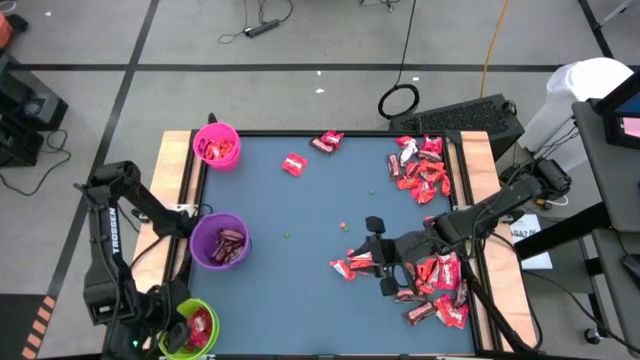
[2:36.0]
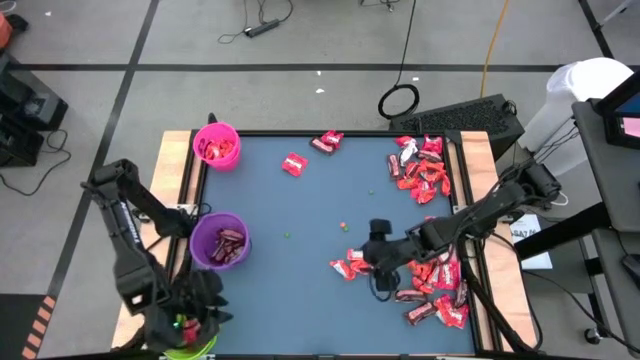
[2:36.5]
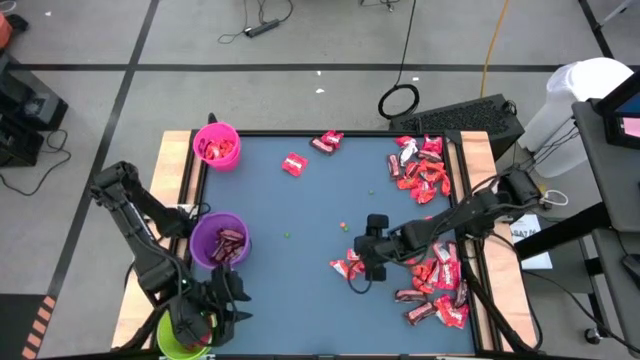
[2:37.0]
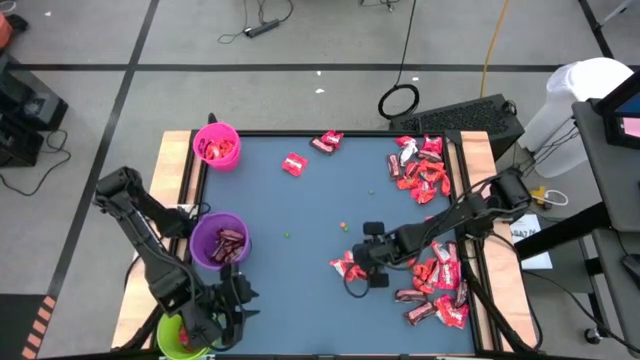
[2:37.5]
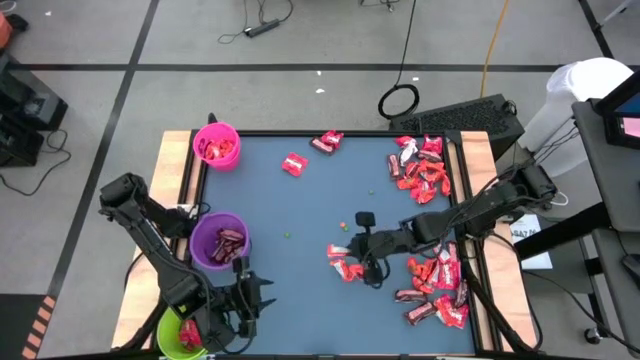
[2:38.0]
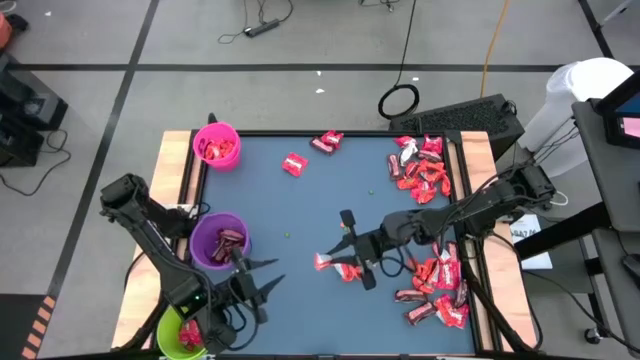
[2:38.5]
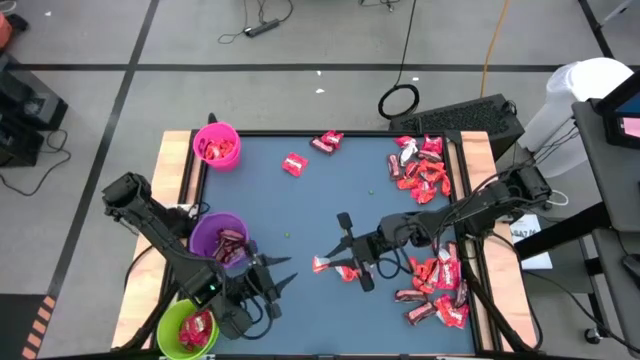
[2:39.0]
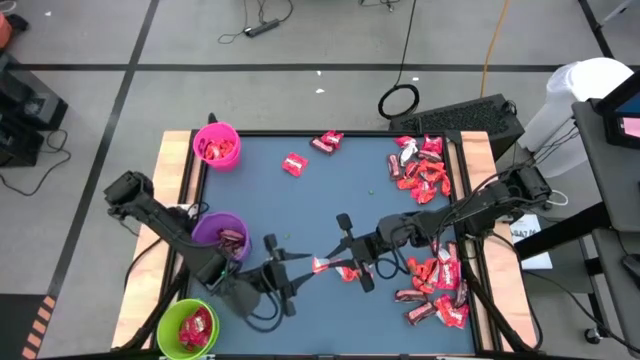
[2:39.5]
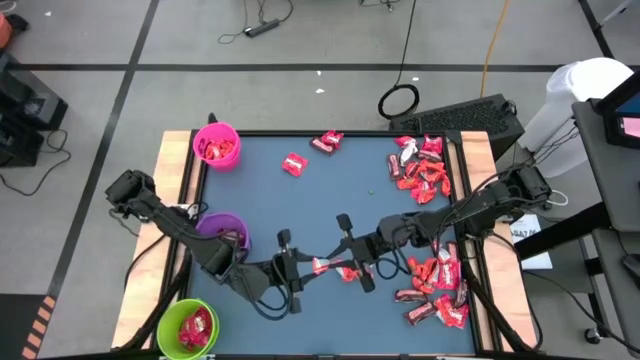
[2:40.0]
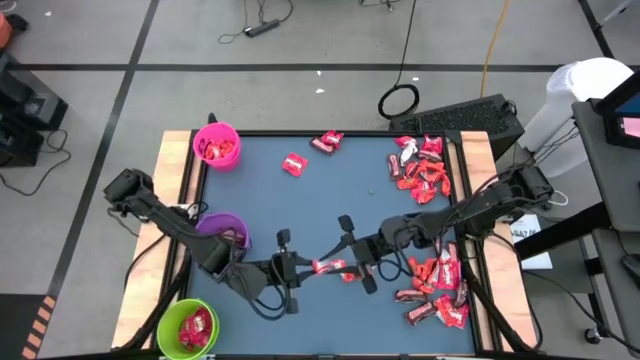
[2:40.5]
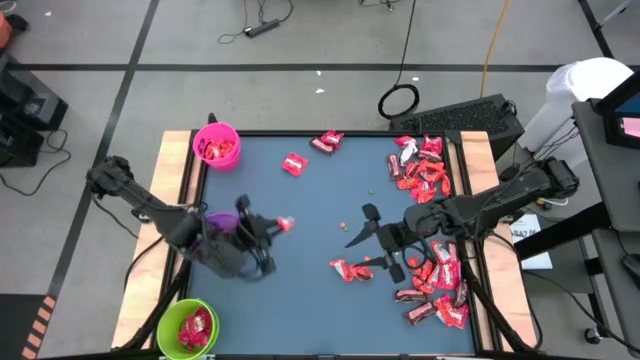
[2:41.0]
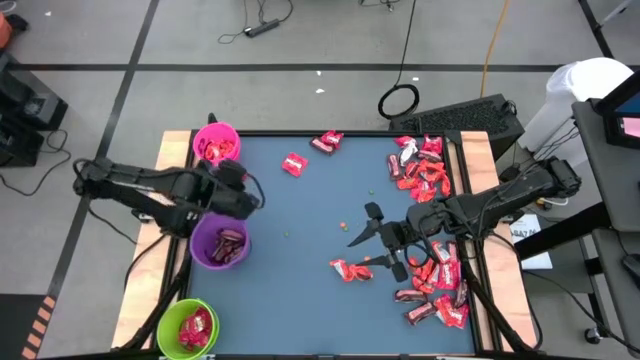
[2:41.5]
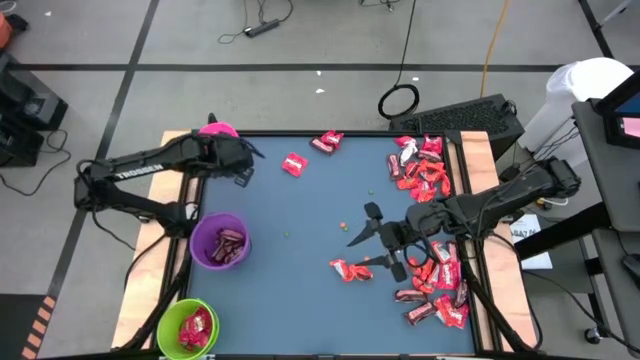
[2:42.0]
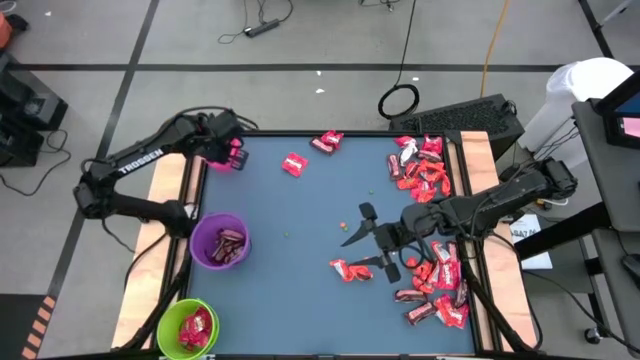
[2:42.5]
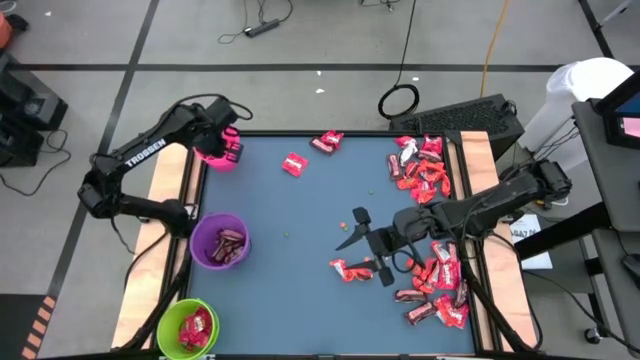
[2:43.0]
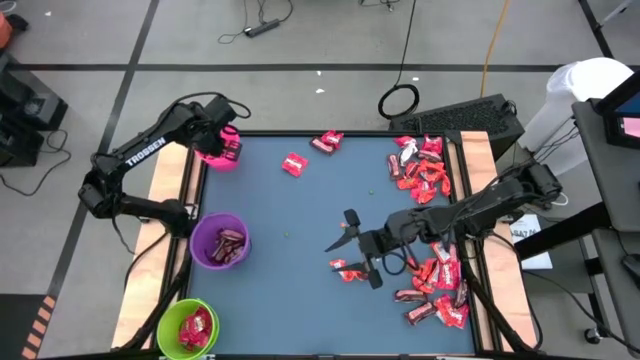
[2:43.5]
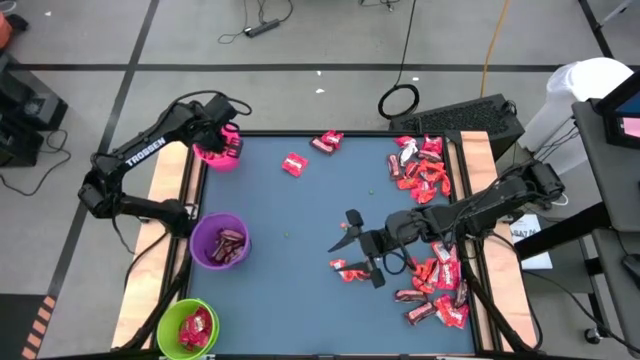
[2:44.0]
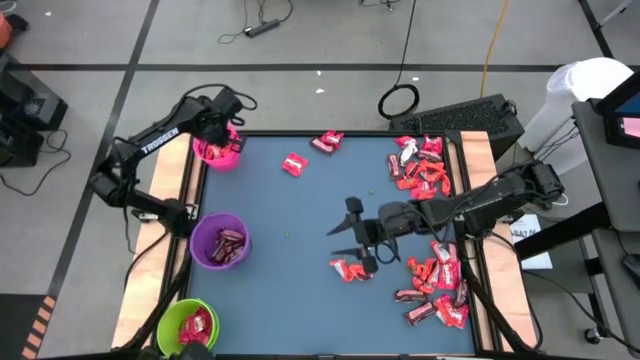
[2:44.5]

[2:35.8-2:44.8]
Task: Organize candy in baskets
Put the orange chocolate into the pink bucket

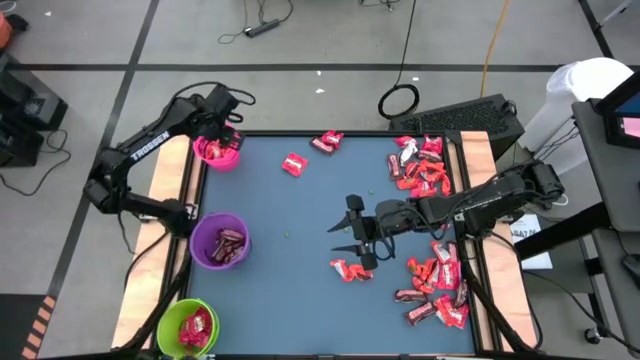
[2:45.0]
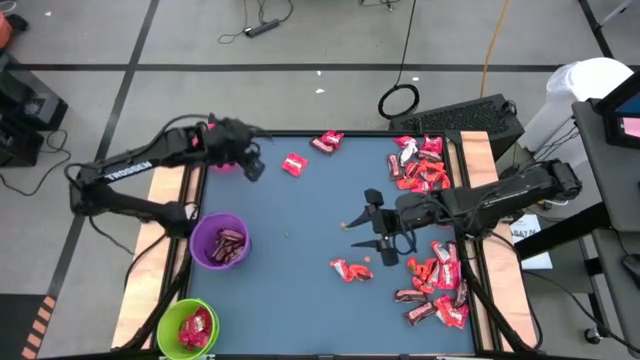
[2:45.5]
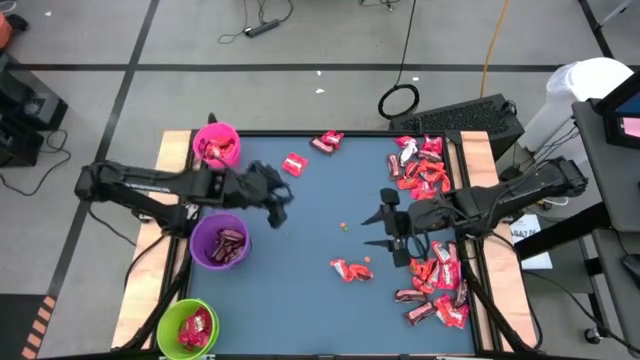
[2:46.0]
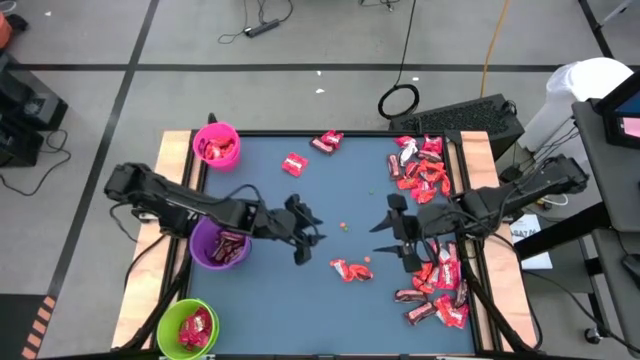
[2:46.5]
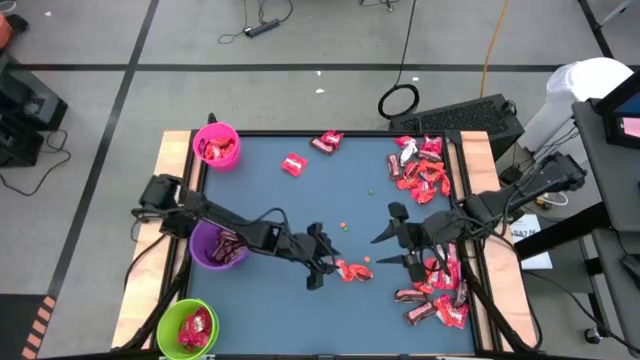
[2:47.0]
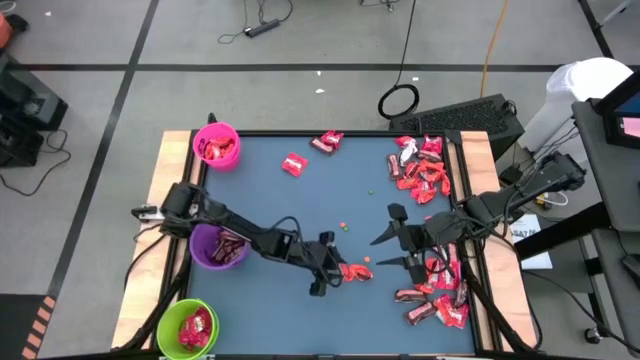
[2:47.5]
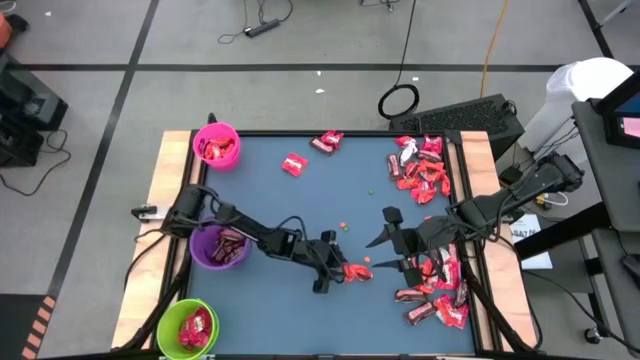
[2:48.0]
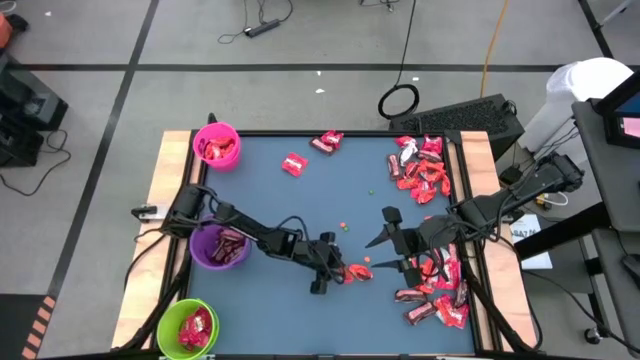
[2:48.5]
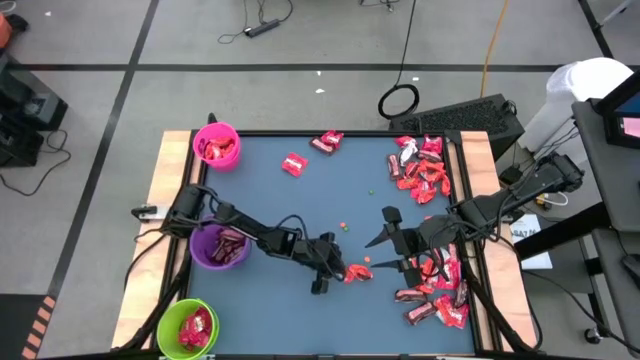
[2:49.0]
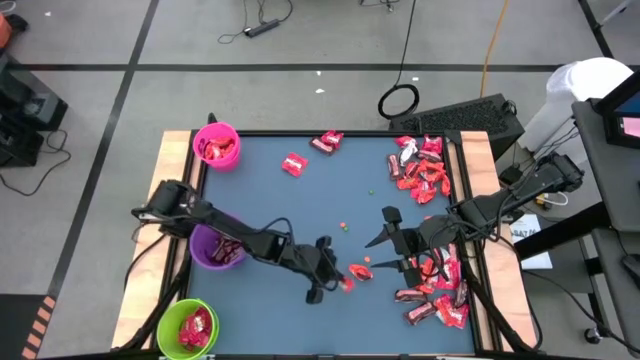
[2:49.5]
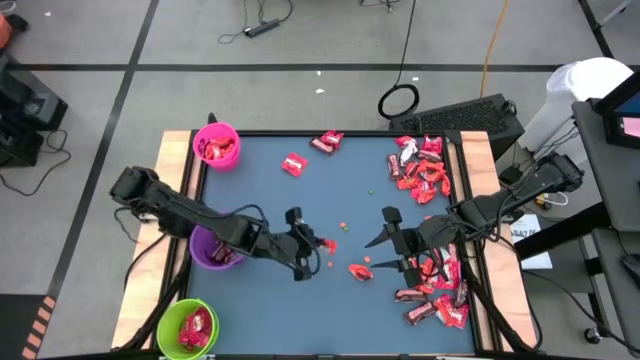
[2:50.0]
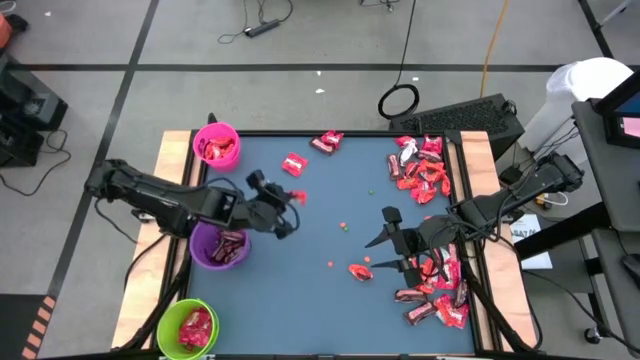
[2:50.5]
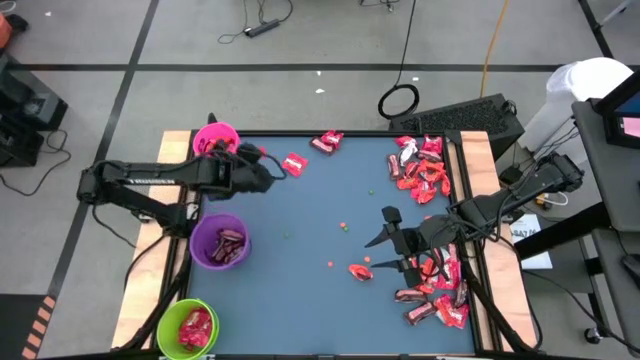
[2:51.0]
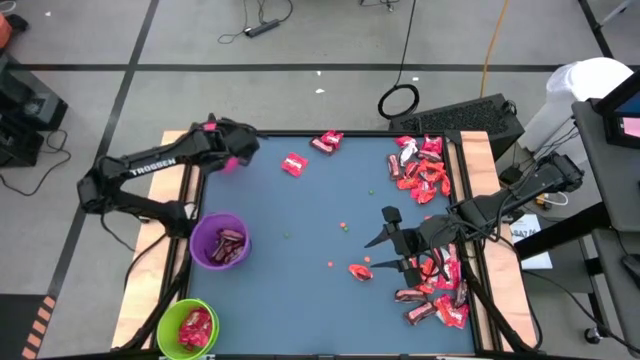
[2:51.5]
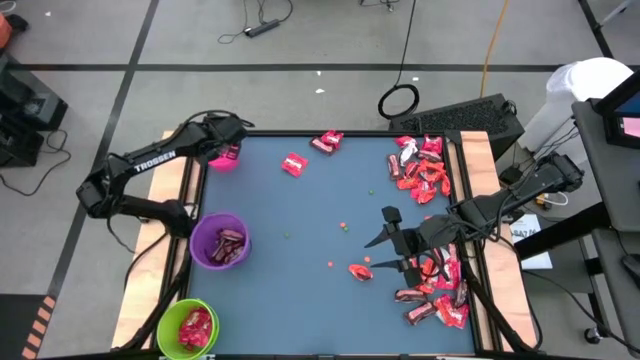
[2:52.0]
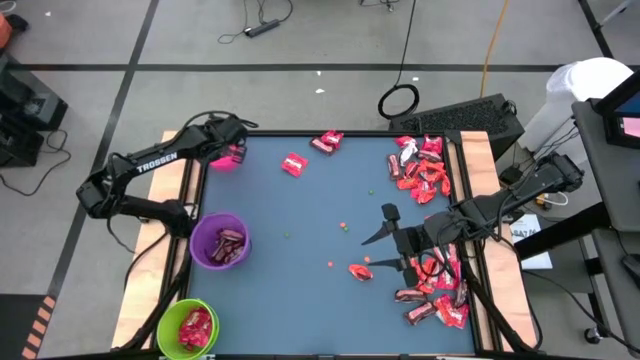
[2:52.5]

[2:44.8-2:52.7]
Put the orange chocolate into the pink bucket

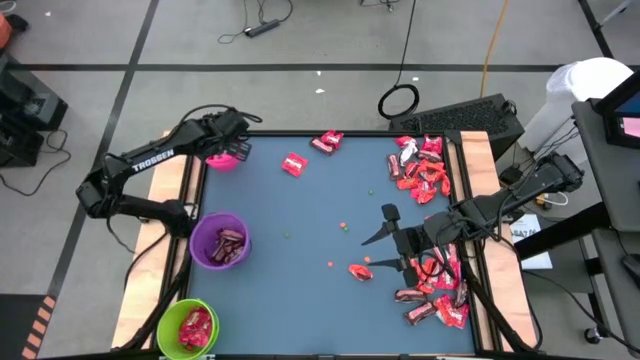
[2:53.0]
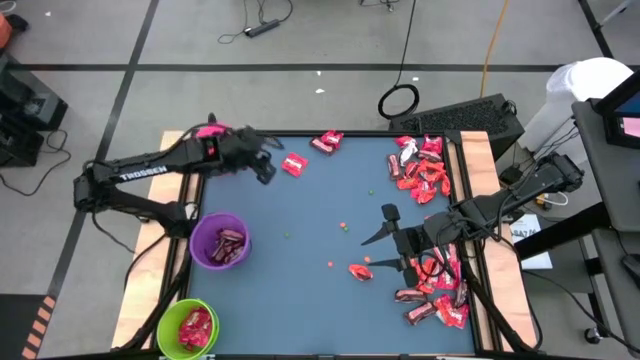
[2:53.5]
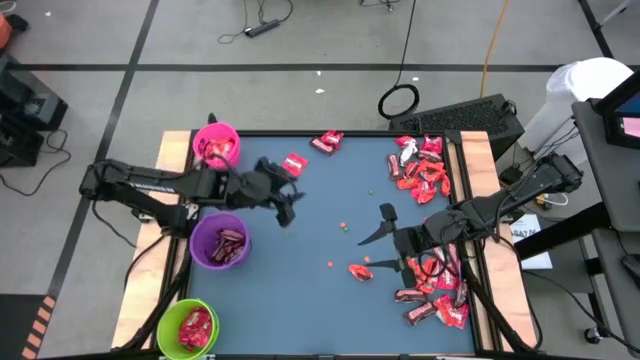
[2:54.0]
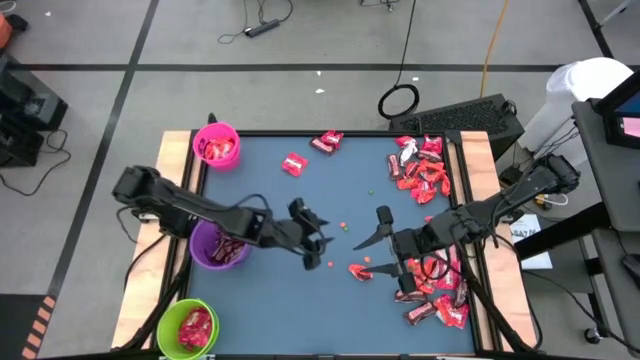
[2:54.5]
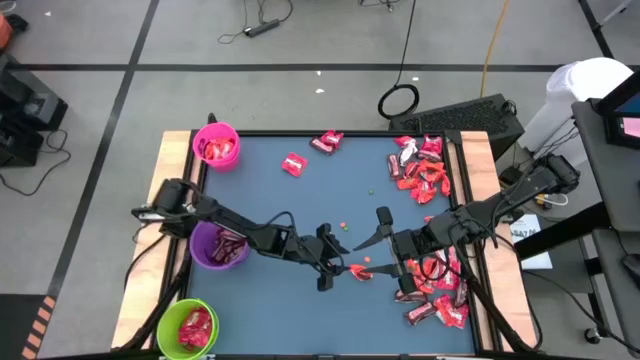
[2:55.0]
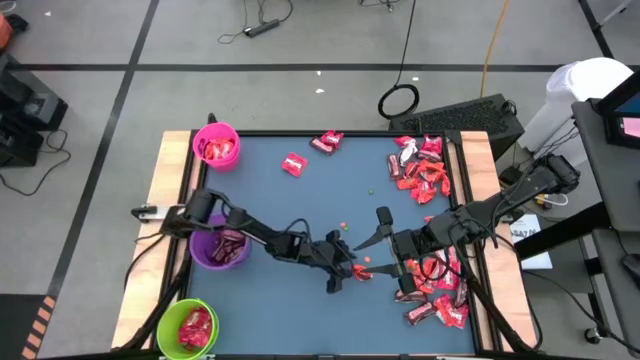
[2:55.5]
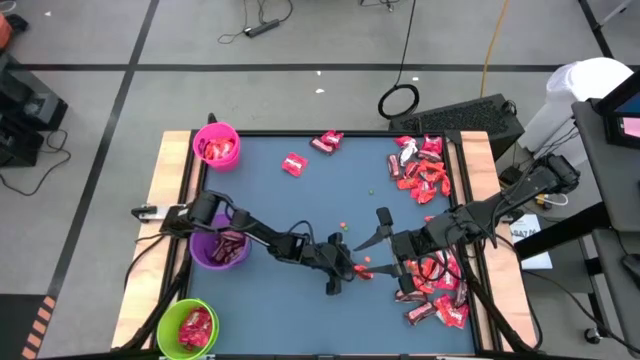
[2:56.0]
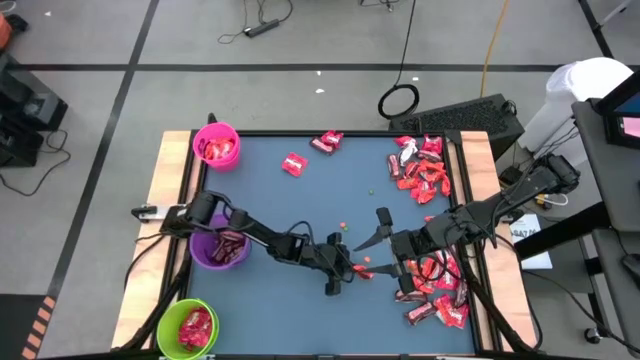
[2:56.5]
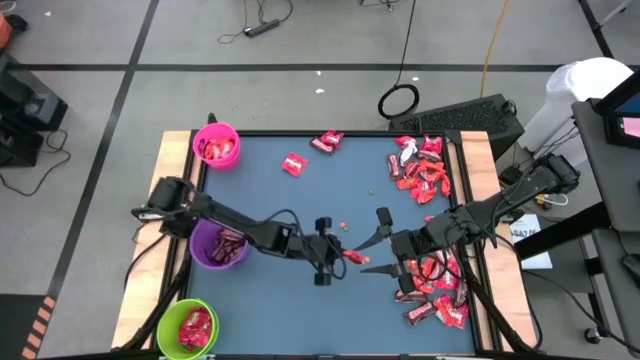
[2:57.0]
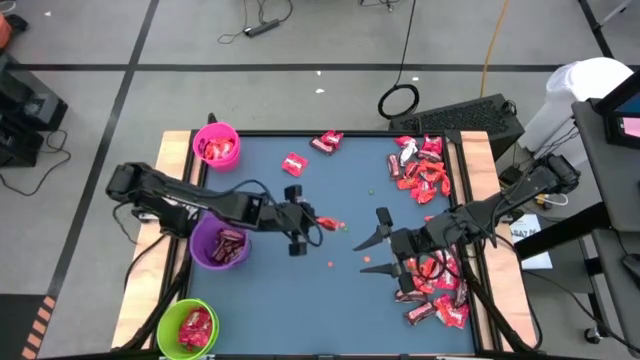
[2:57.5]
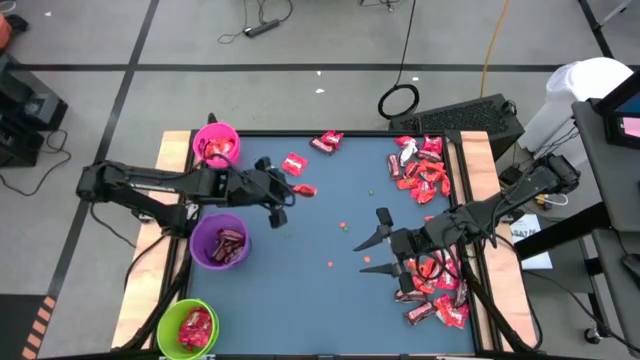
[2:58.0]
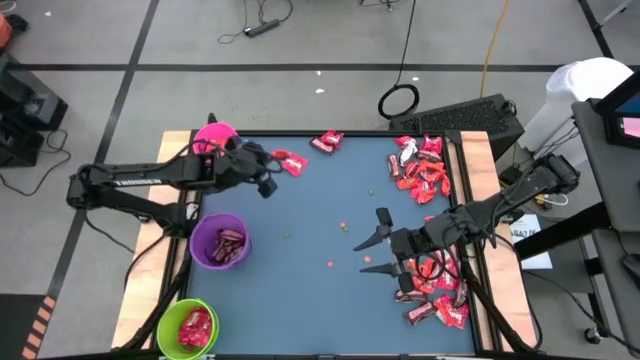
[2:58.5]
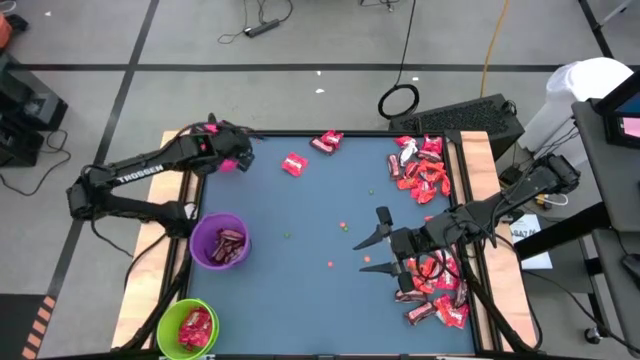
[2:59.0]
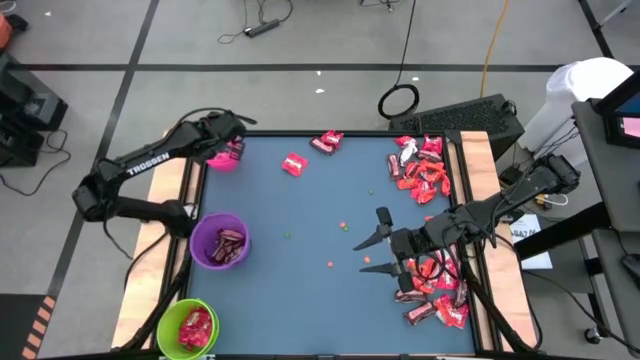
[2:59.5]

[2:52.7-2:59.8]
Put the orange chocolate into the pink bucket
